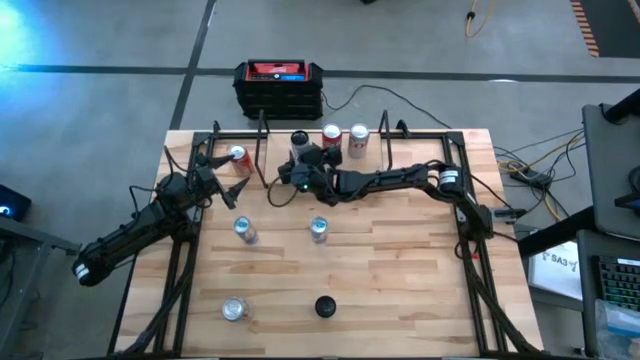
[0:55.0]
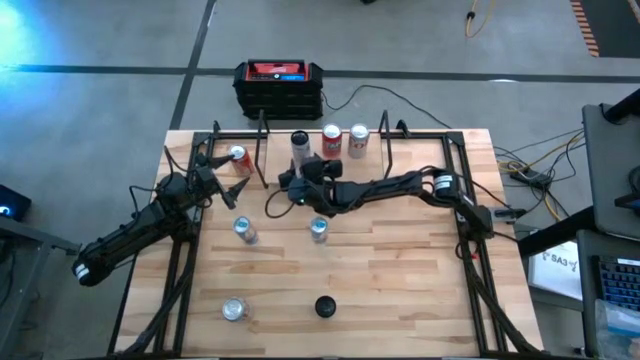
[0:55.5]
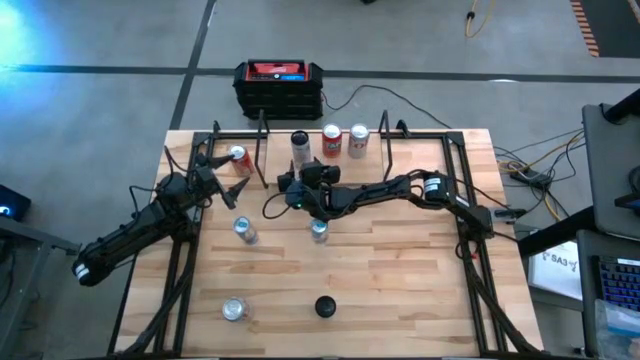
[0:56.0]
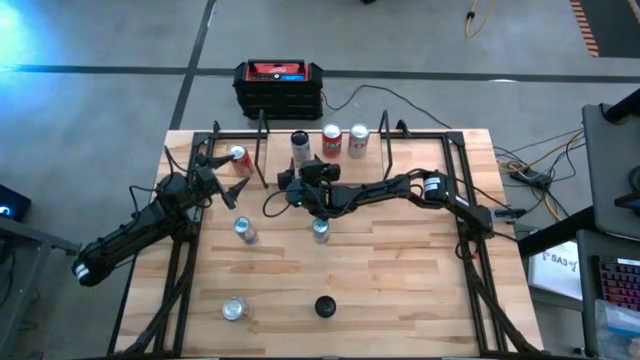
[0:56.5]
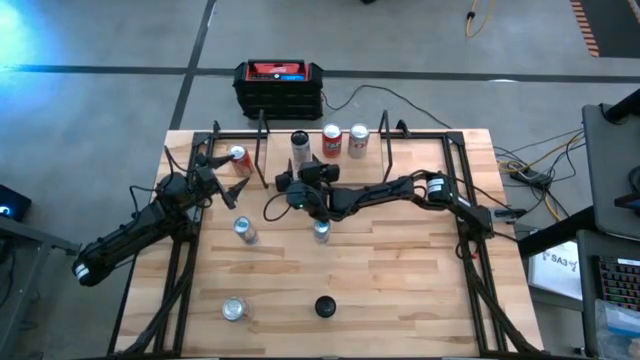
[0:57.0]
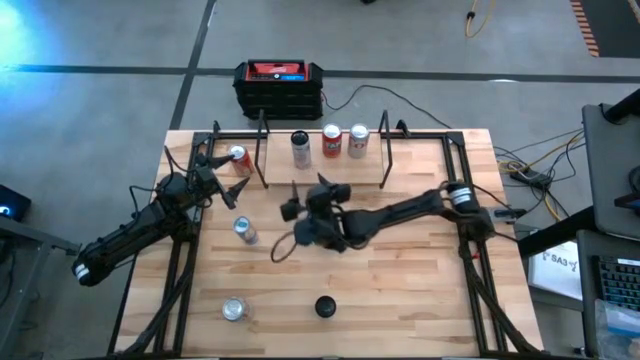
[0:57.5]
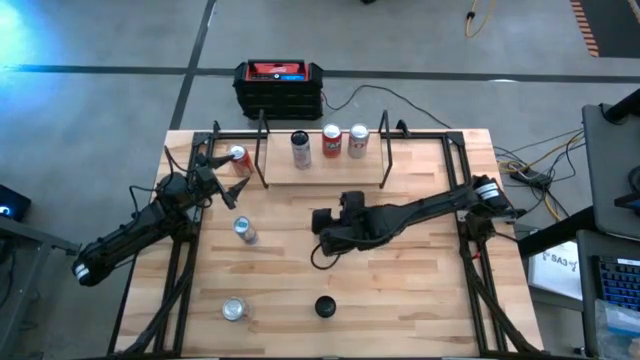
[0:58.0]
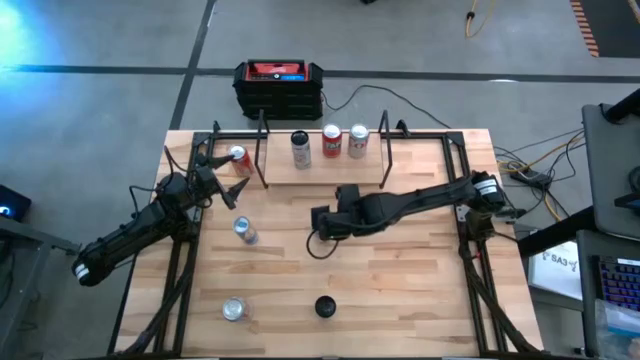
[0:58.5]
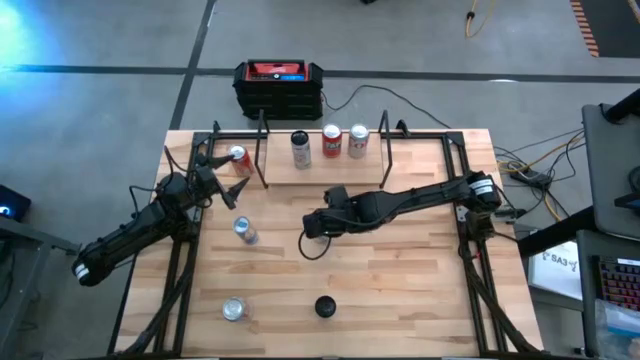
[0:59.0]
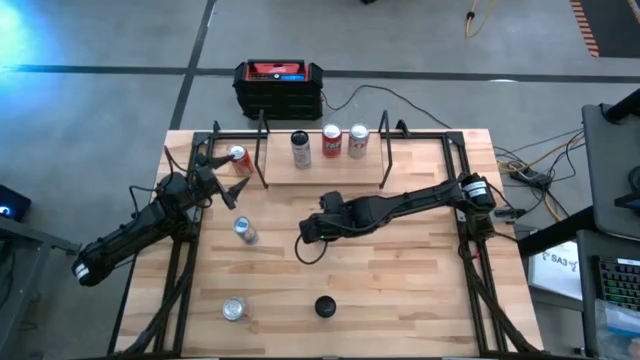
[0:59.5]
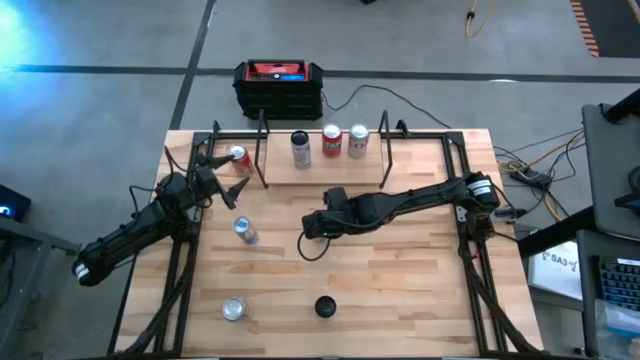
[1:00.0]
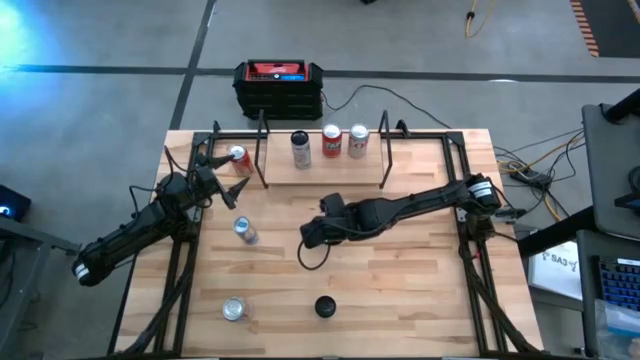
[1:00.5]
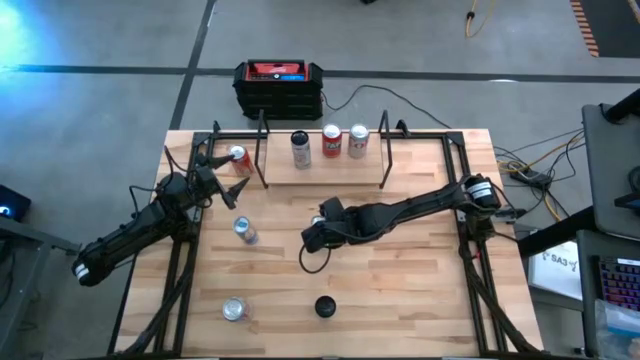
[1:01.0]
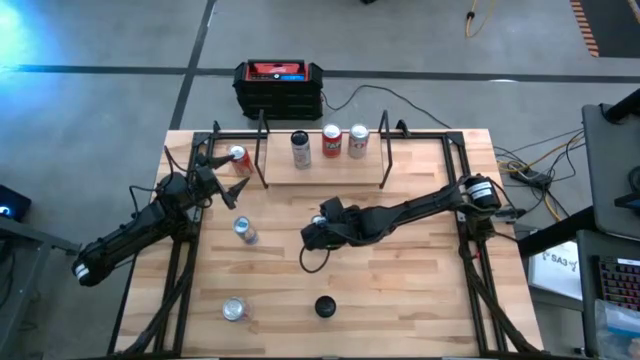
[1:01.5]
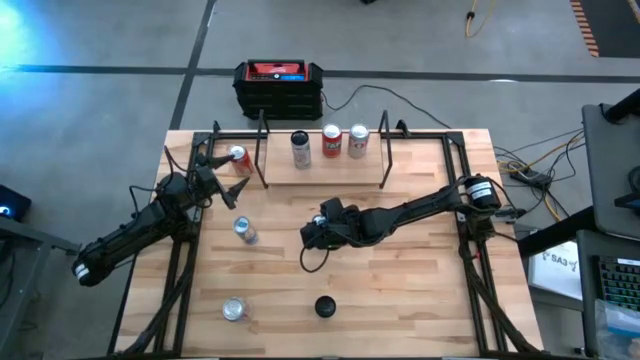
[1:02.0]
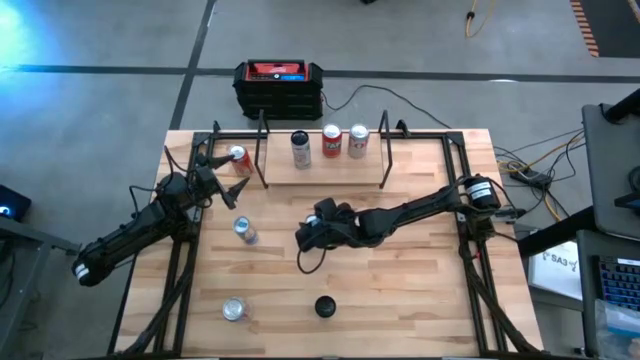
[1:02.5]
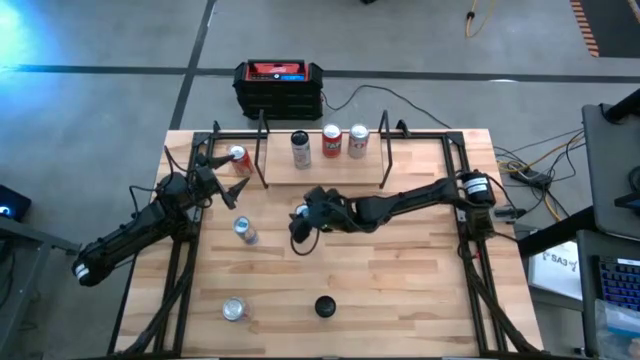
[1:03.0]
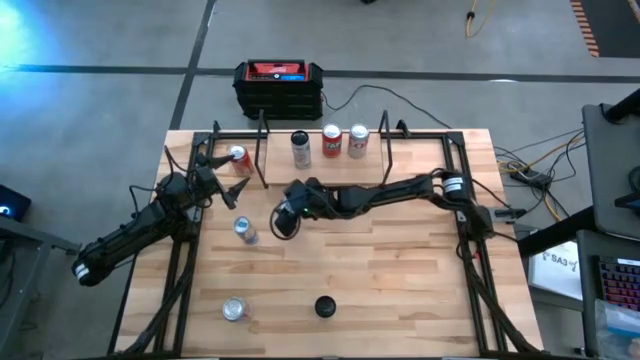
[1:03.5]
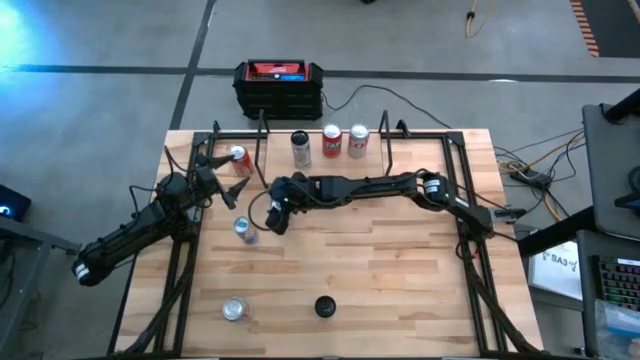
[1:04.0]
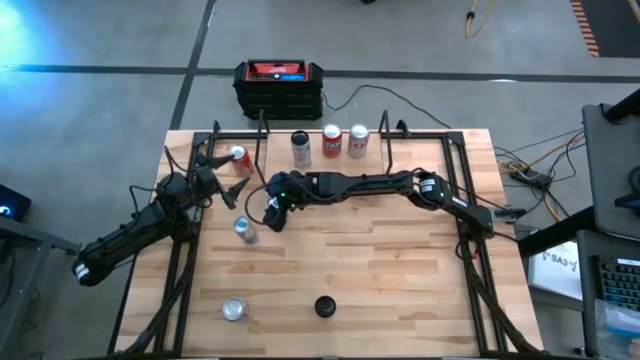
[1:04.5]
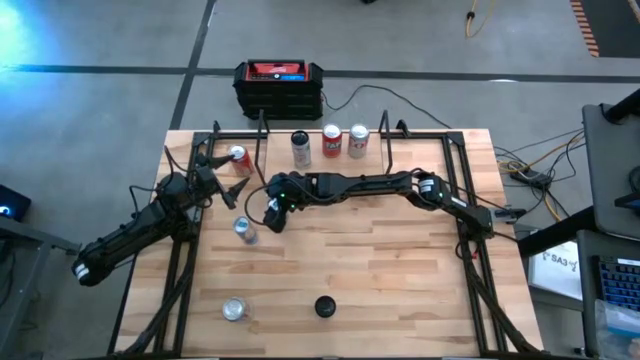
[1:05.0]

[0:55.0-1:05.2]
Task: Place canned beverage on shelf
Move the blue soda can to the top left of the table

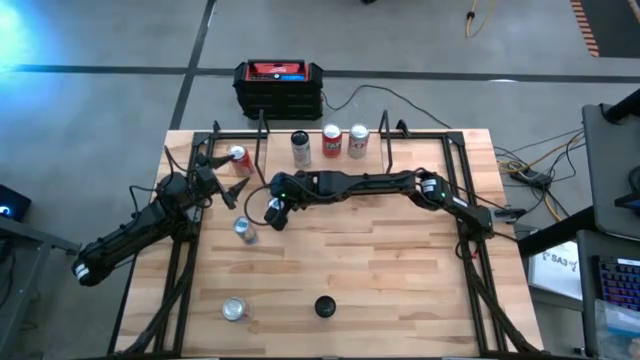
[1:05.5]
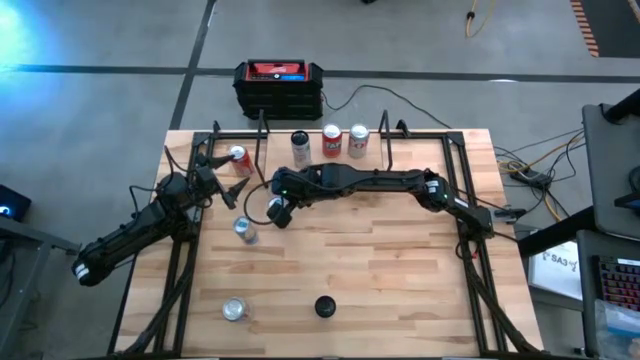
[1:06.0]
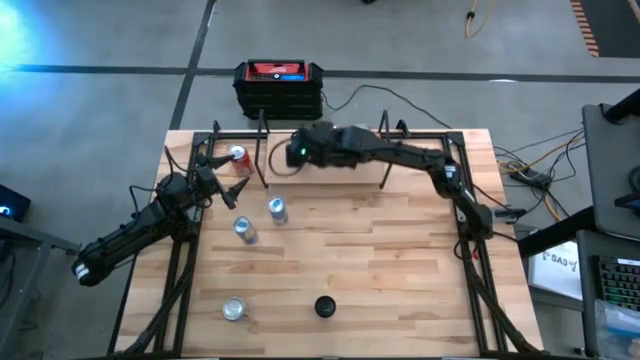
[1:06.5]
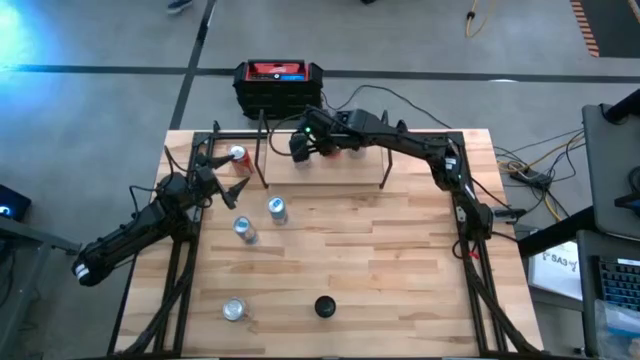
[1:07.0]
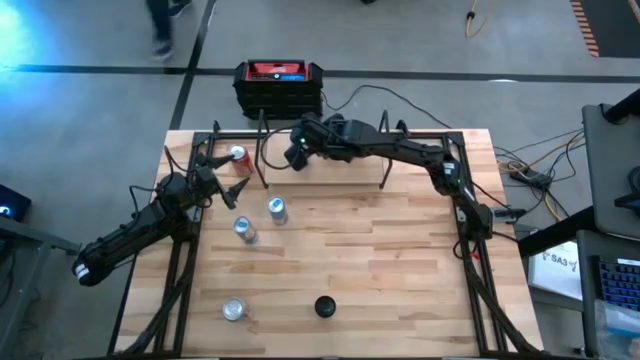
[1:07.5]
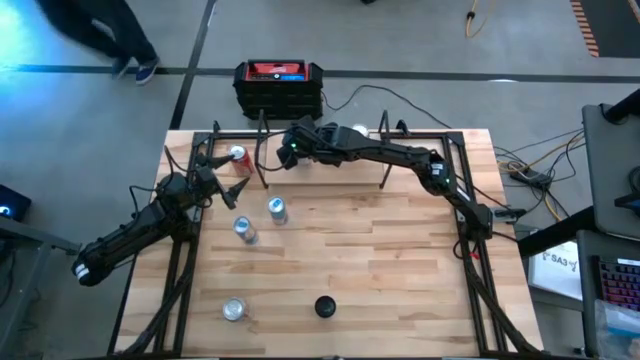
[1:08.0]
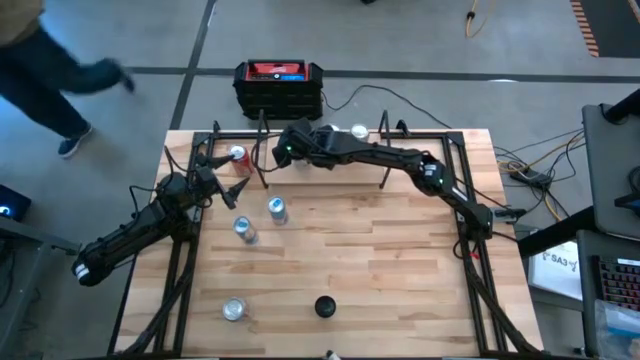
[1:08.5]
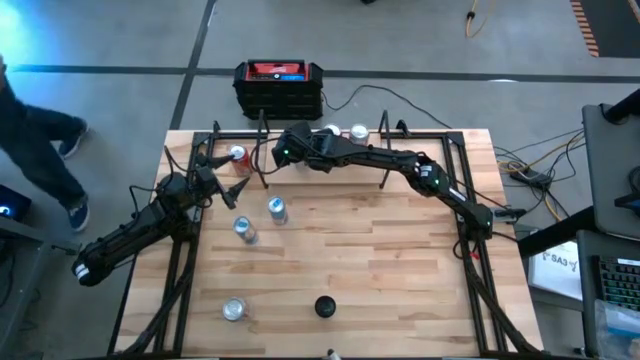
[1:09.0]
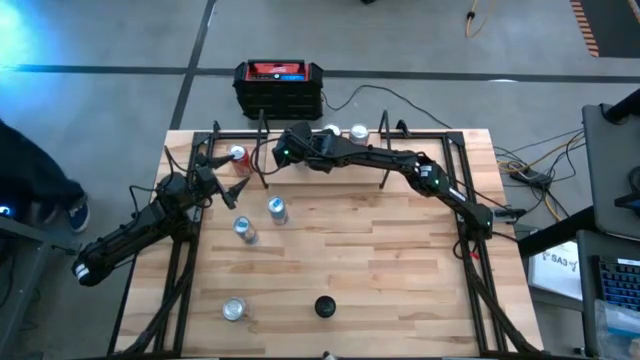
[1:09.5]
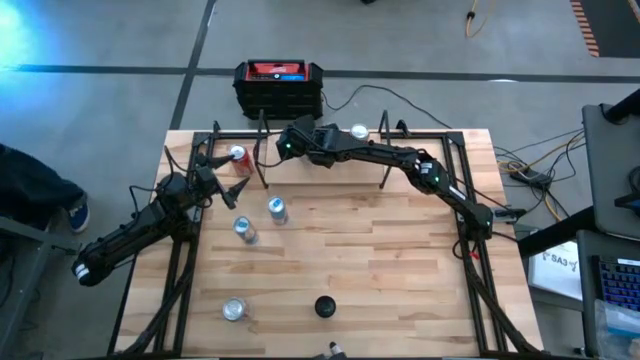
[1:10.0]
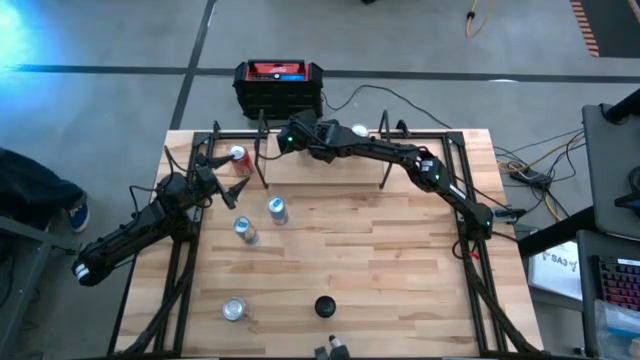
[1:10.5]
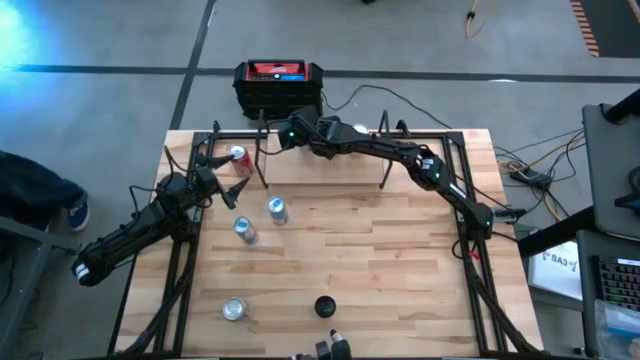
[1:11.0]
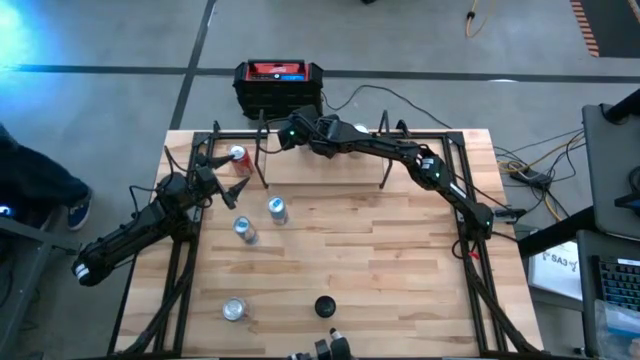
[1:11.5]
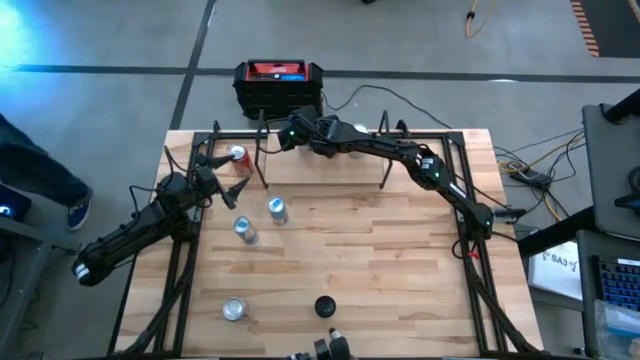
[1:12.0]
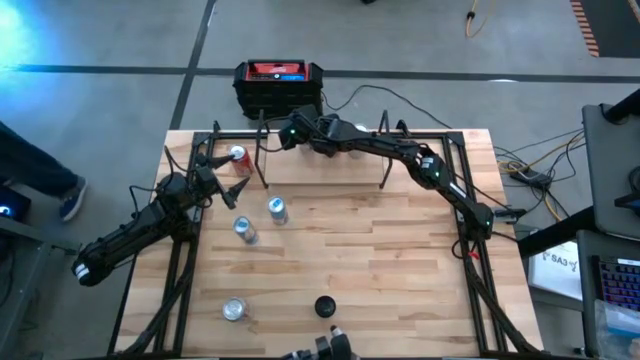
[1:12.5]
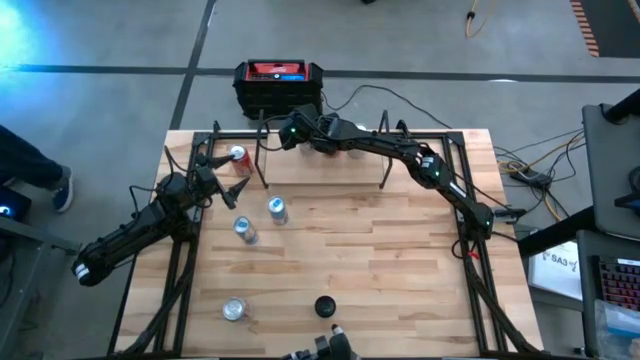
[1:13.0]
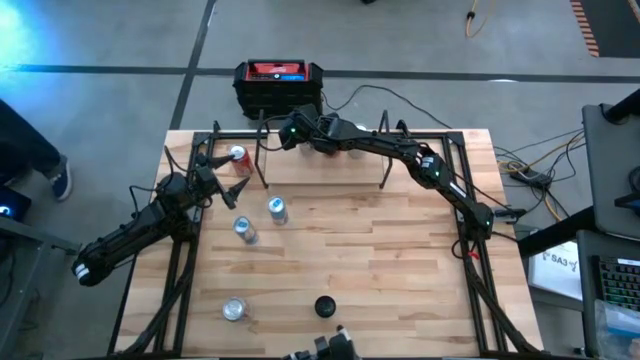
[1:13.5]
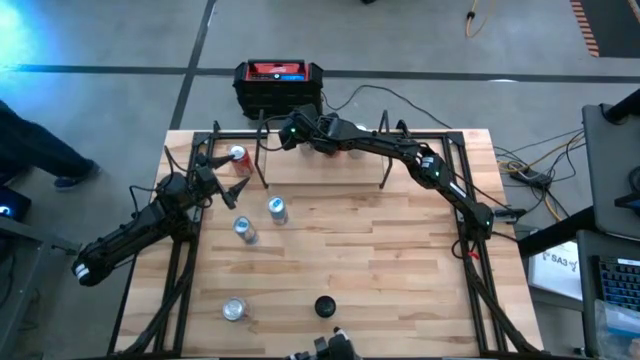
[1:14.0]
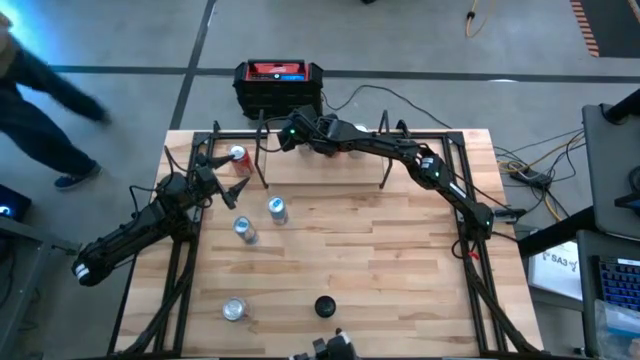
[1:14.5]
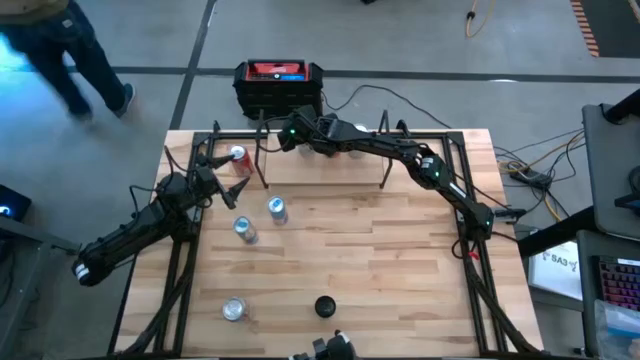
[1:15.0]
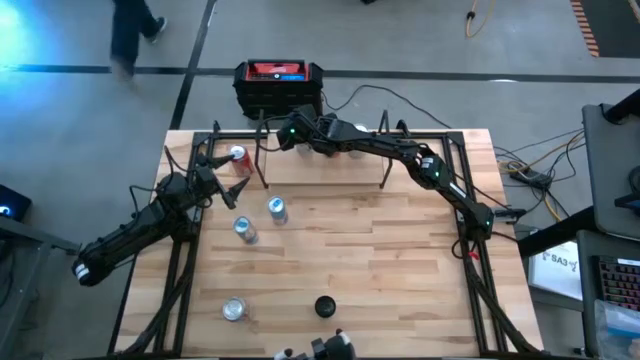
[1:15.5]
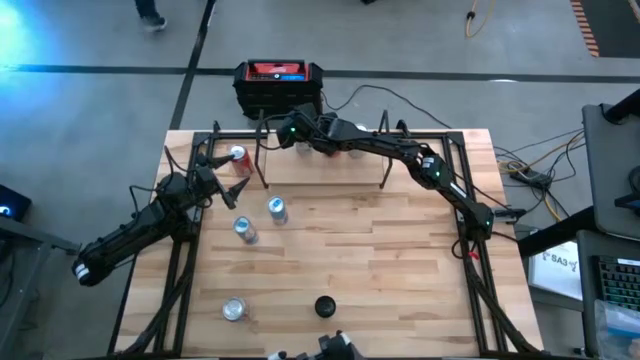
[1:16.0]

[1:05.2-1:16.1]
Adjust the white and pink soda can on the shelf
